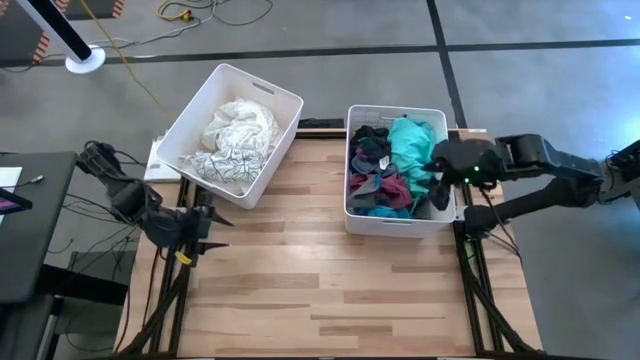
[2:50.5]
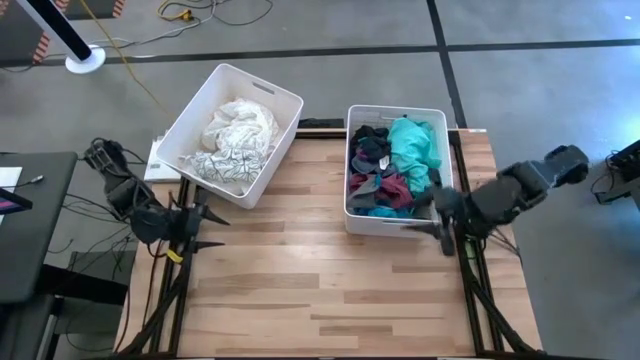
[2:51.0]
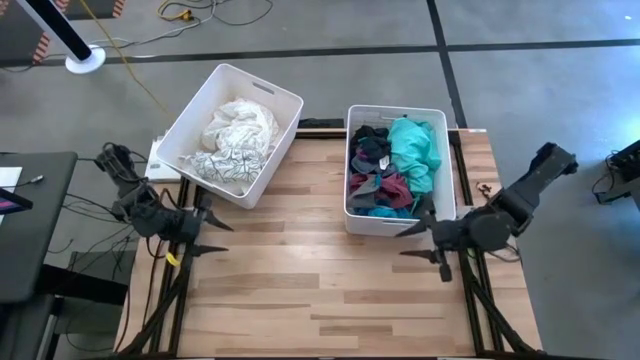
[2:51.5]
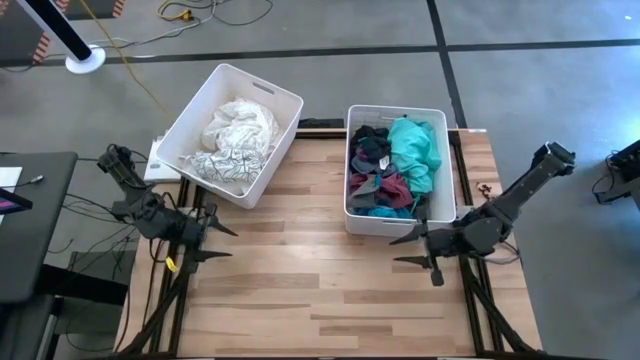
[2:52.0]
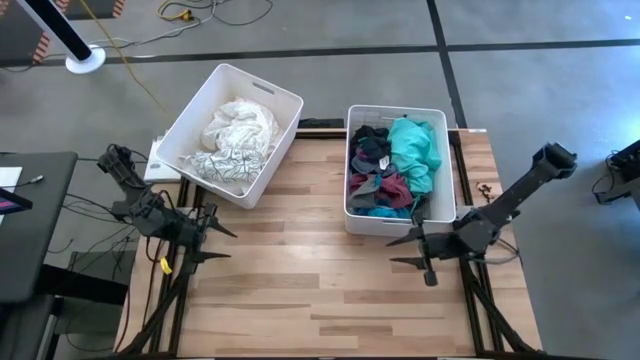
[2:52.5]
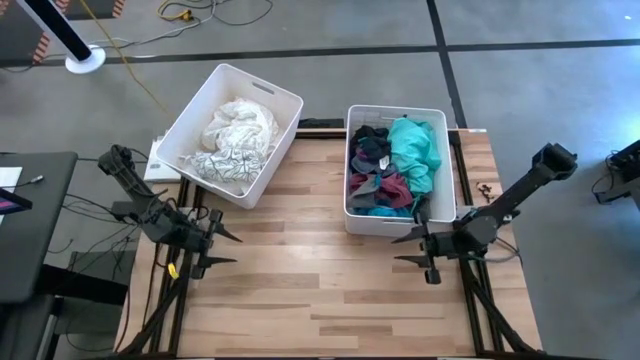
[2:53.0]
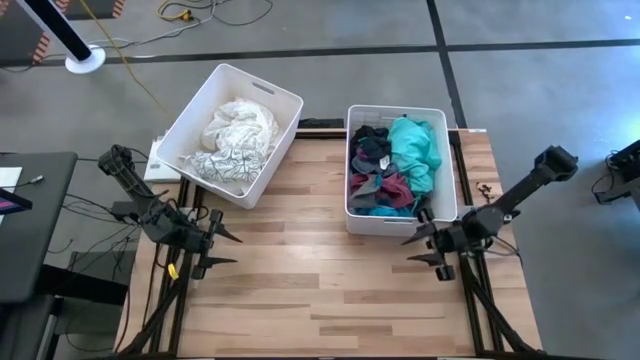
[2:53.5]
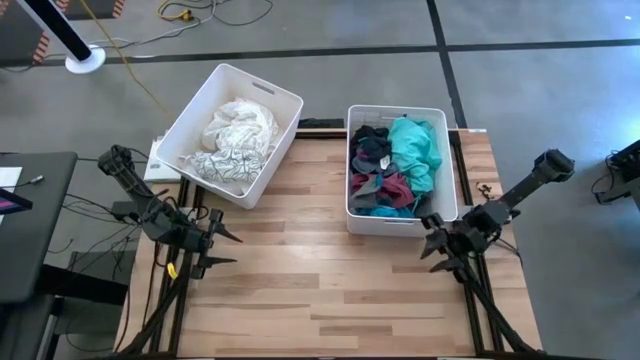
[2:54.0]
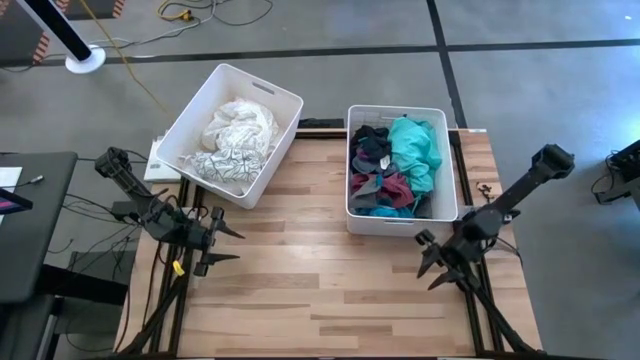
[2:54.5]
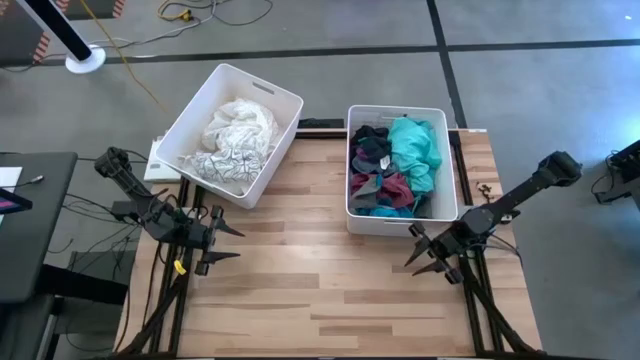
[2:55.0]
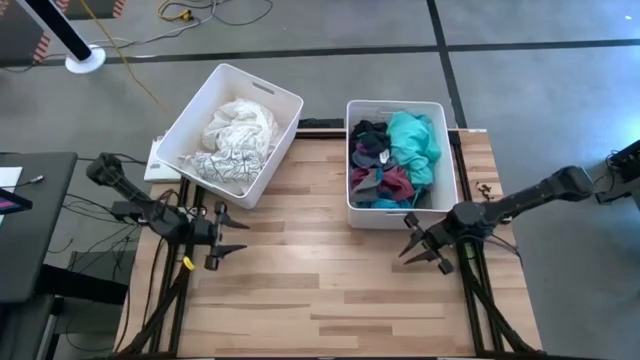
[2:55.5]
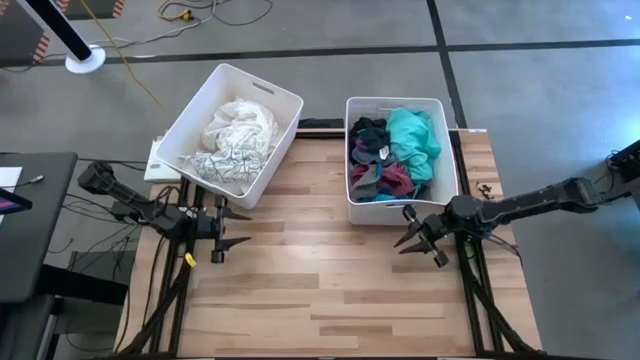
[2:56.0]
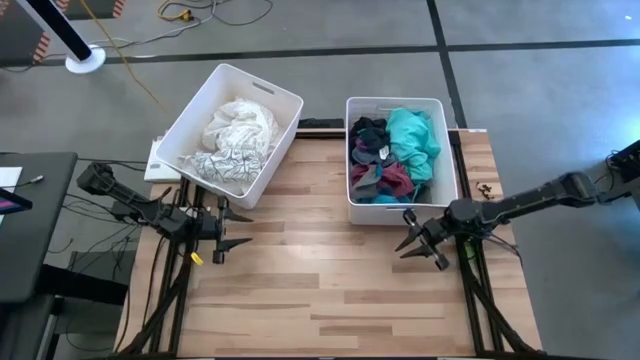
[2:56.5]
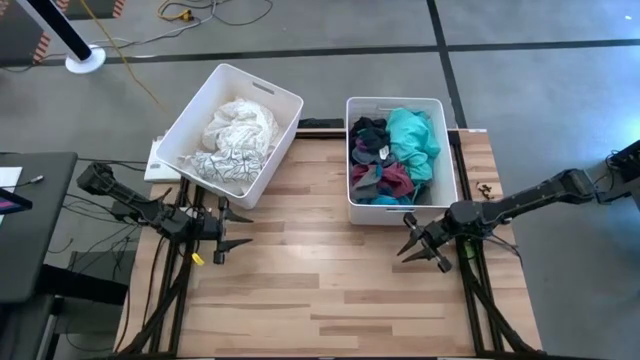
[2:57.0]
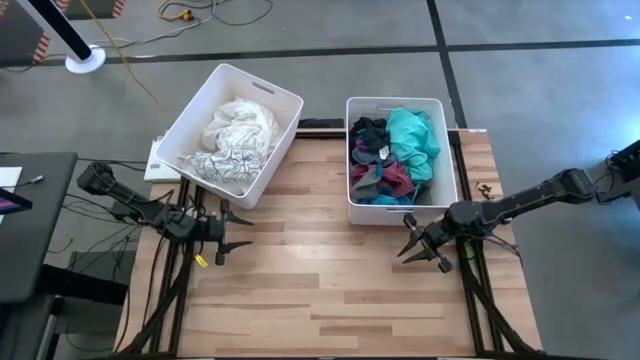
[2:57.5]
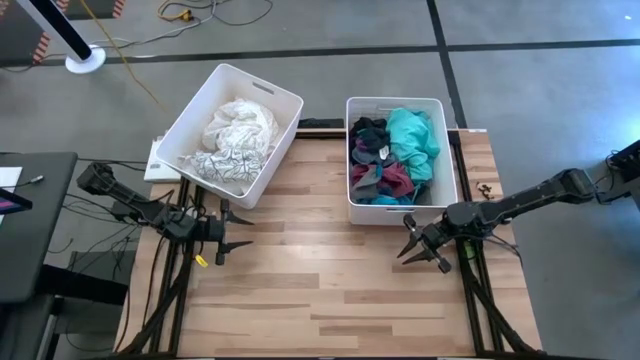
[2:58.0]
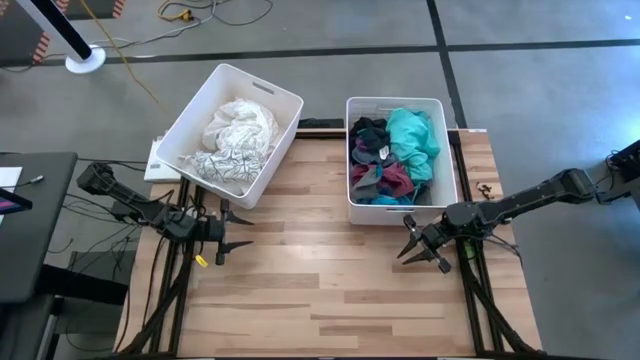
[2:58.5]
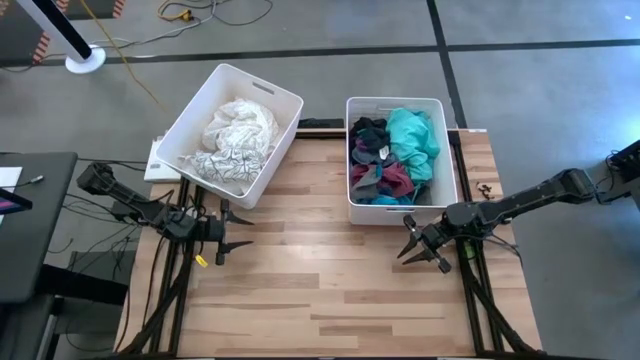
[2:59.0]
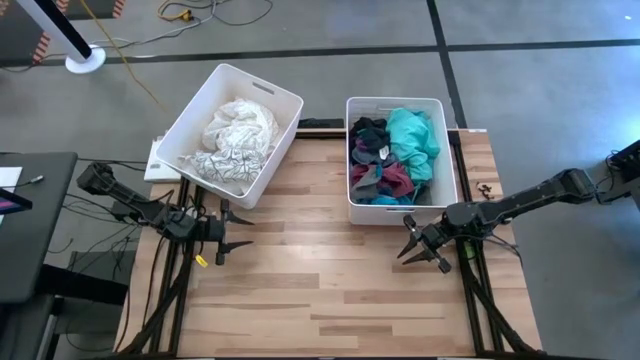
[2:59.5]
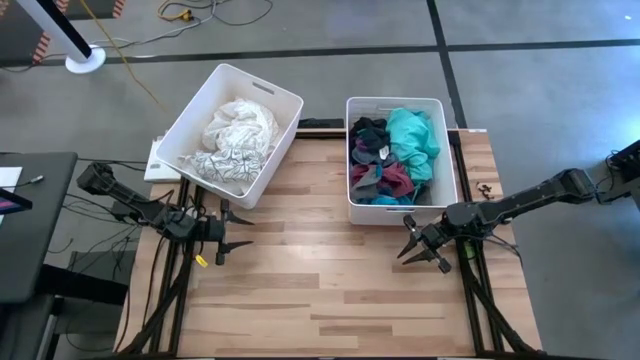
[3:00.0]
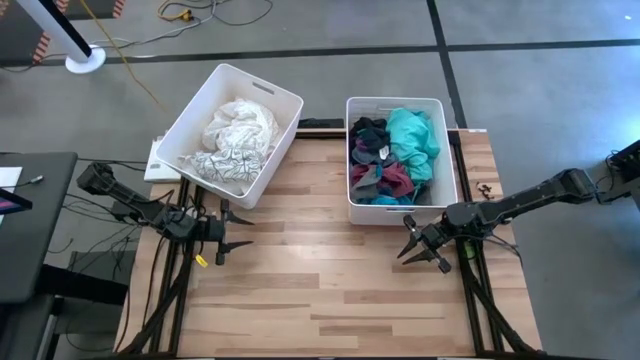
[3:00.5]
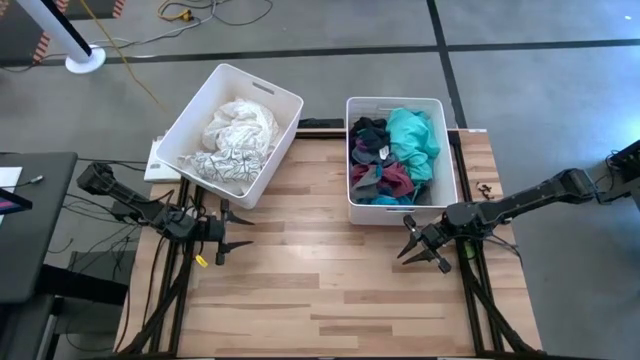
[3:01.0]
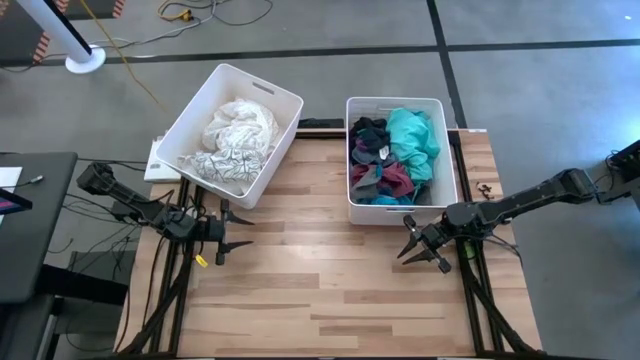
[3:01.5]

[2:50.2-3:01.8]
Task: Sort clothes
Return to Home Position

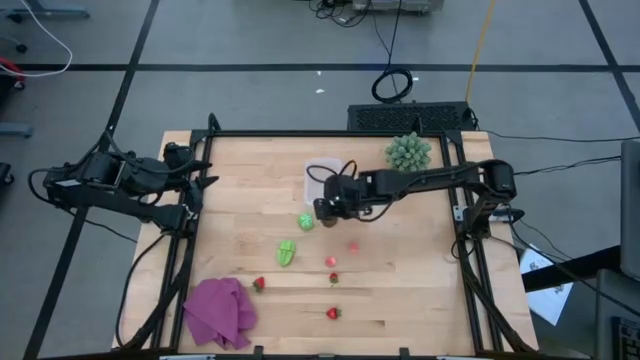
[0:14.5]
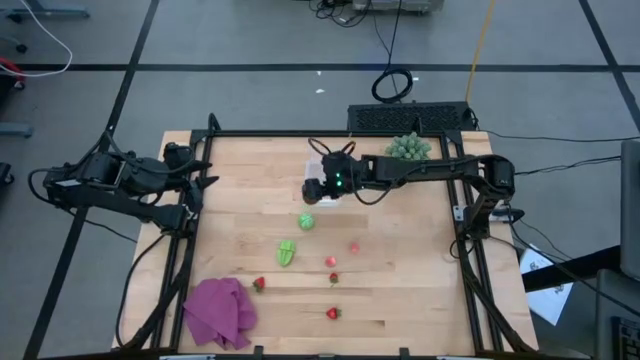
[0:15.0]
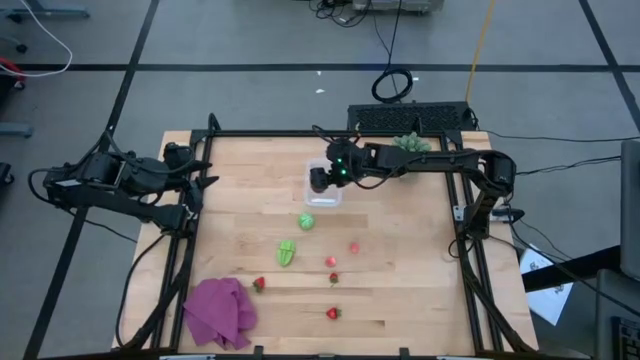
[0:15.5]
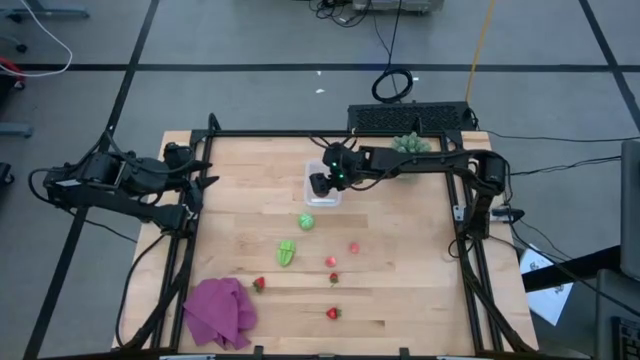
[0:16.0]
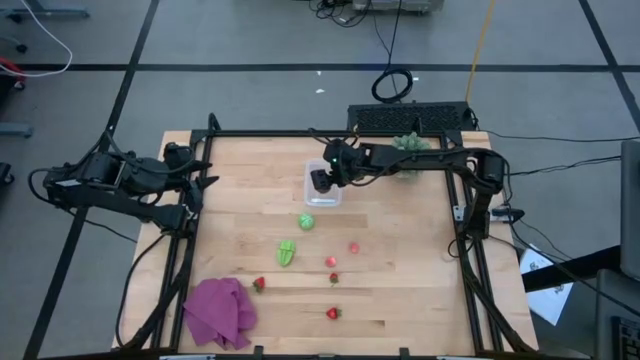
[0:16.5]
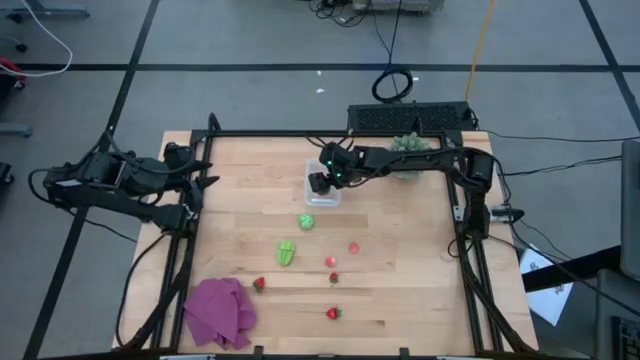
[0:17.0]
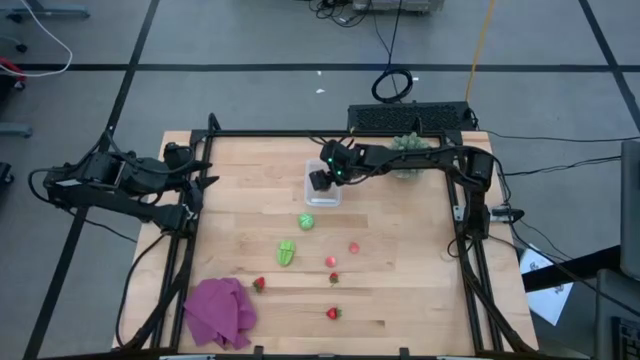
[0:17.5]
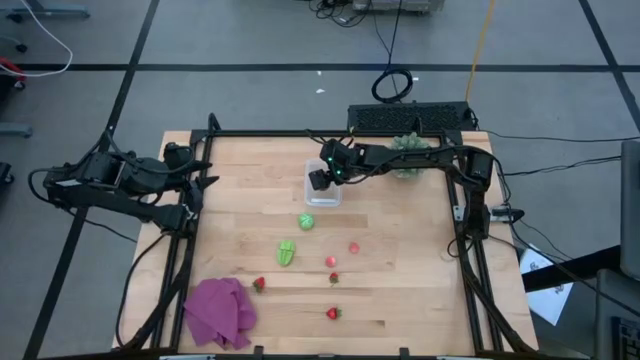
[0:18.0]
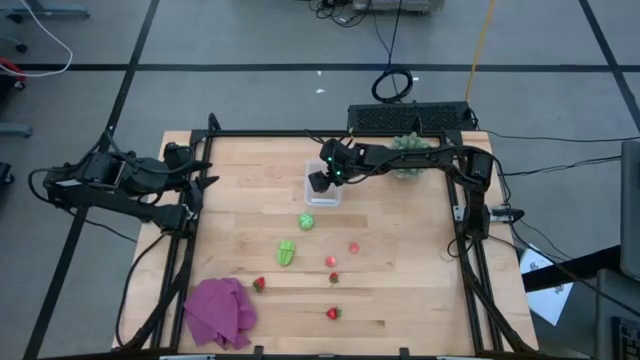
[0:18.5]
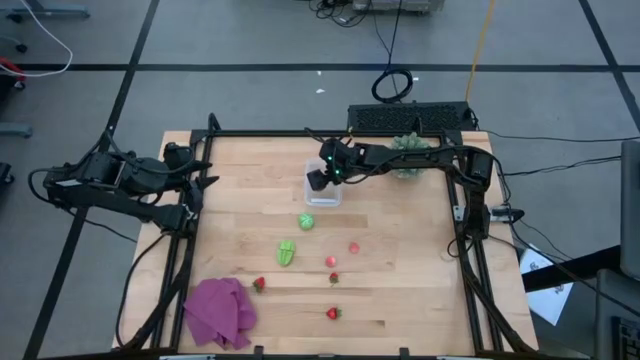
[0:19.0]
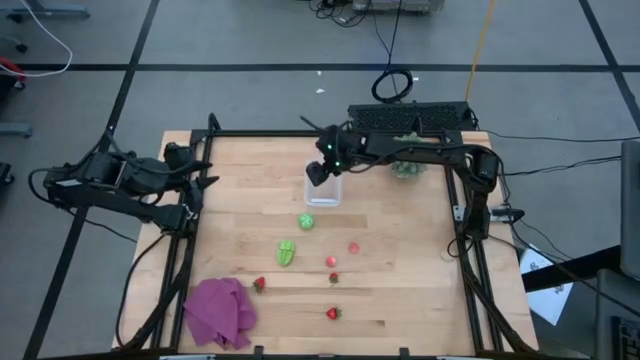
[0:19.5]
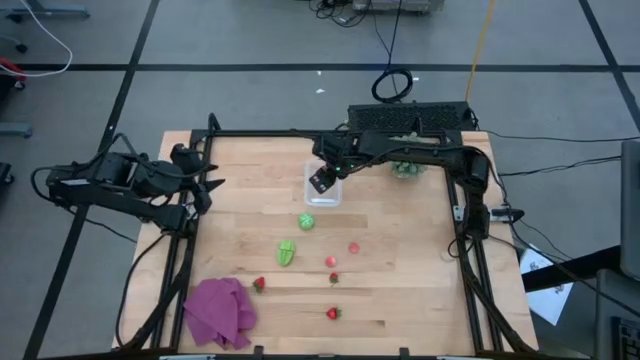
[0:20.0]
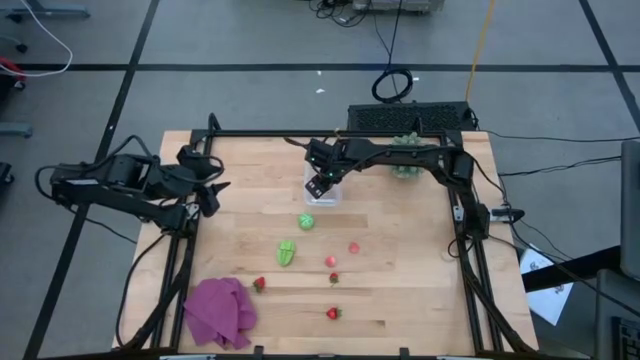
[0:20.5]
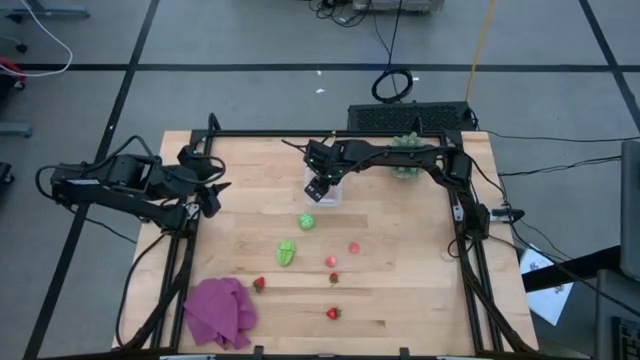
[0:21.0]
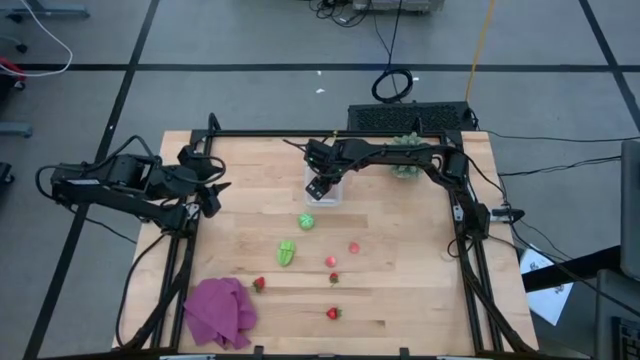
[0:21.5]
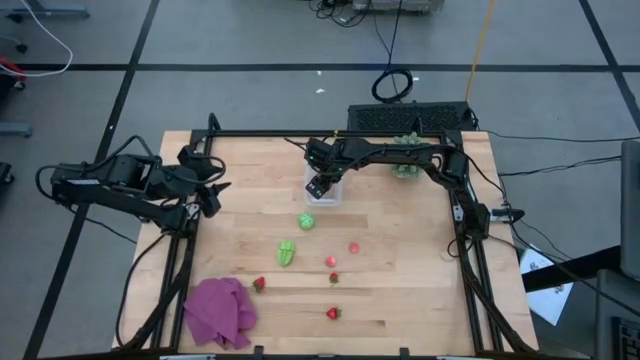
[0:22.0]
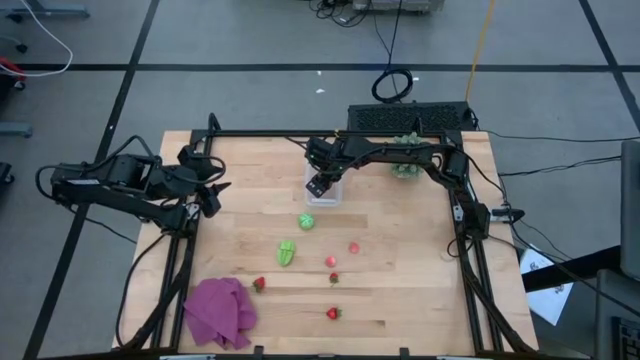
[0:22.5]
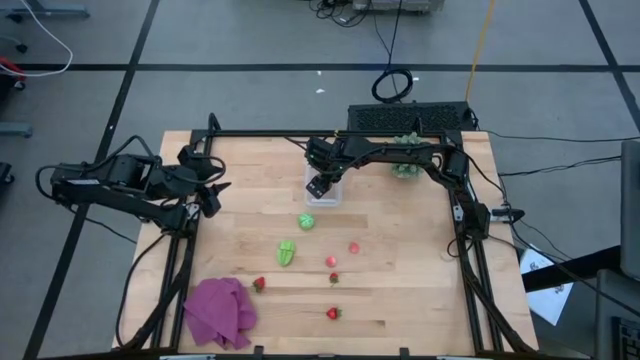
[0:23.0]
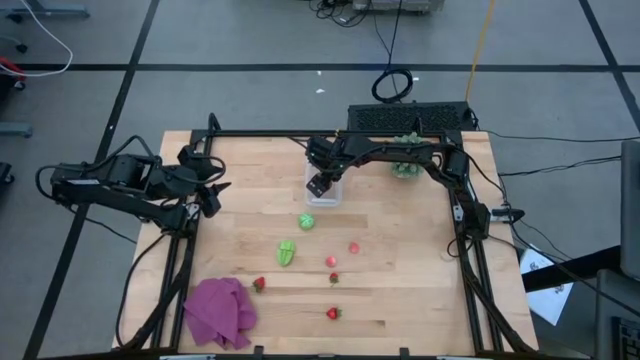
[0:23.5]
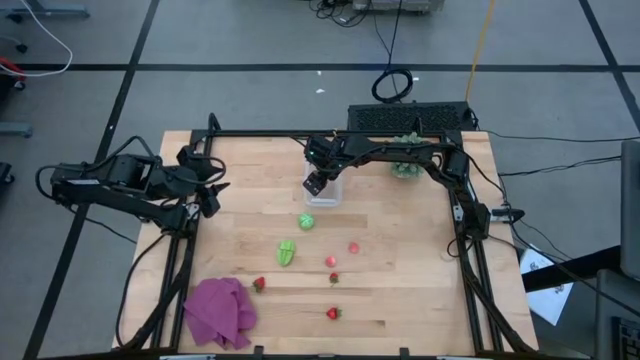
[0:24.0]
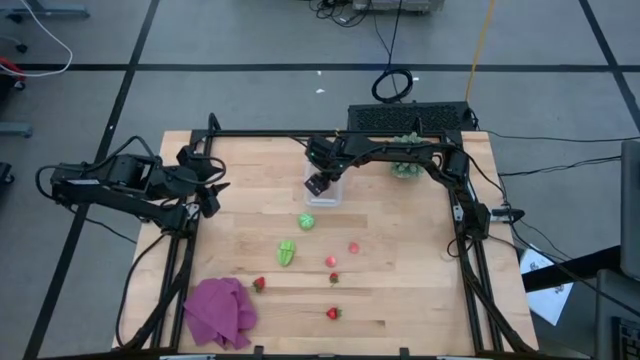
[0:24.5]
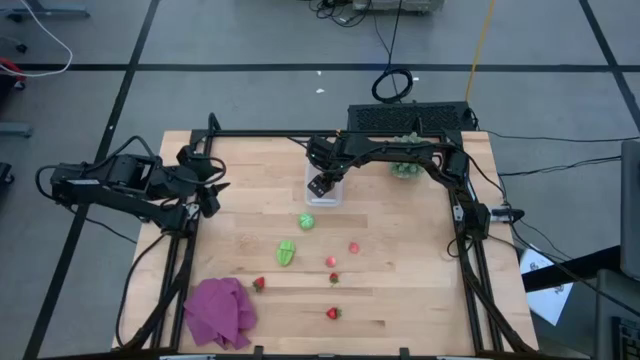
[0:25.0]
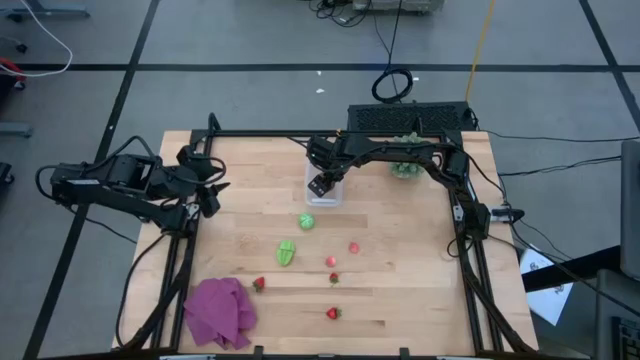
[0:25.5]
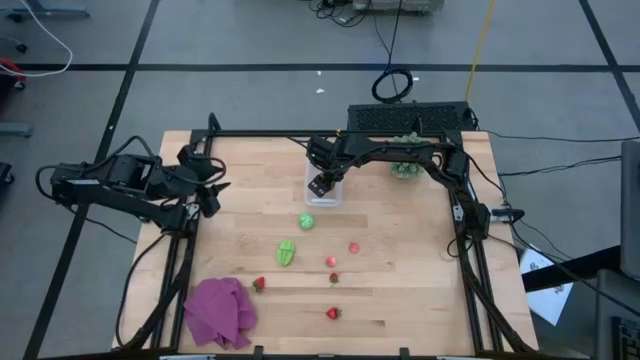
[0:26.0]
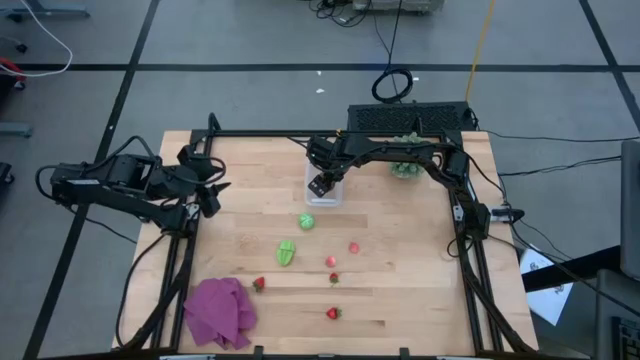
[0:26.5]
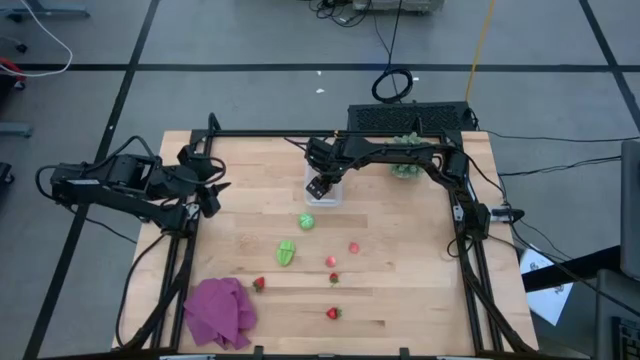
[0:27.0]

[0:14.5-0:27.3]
Task: Pick and placing Produce into tupperware
Put the kiwi into the transparent bin
